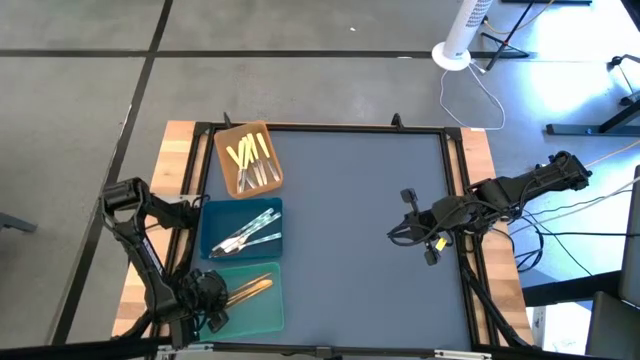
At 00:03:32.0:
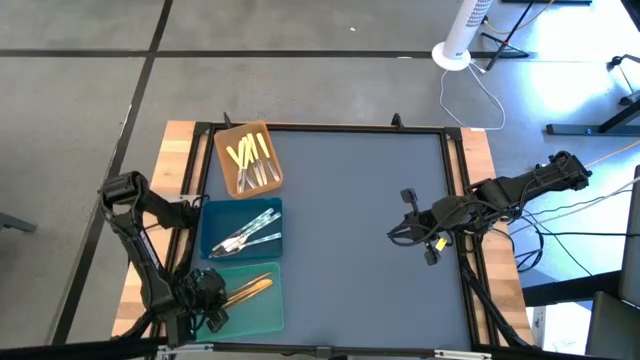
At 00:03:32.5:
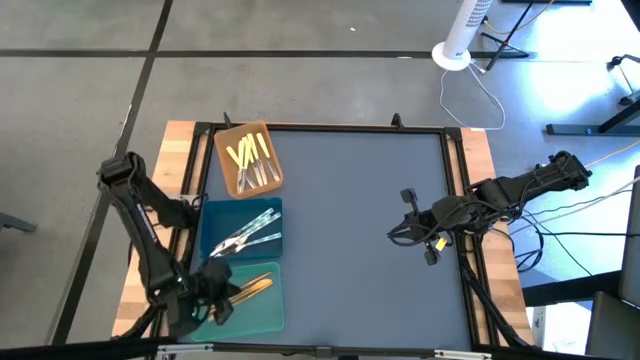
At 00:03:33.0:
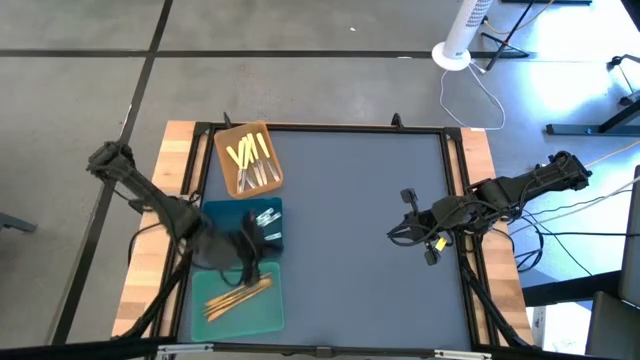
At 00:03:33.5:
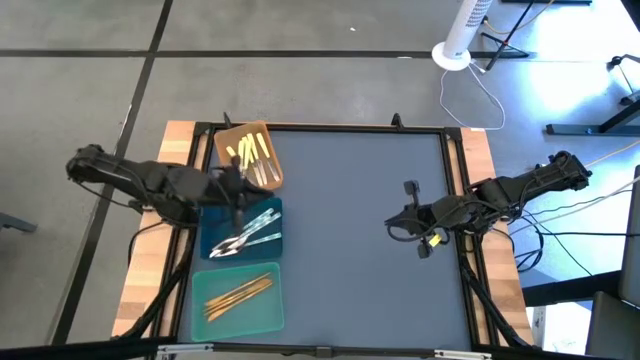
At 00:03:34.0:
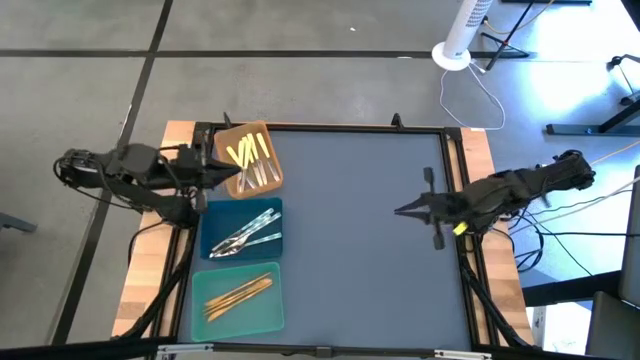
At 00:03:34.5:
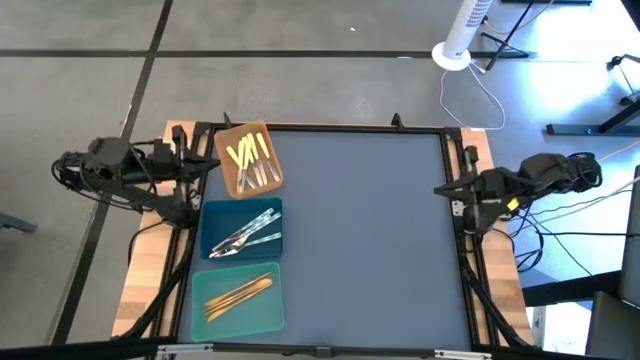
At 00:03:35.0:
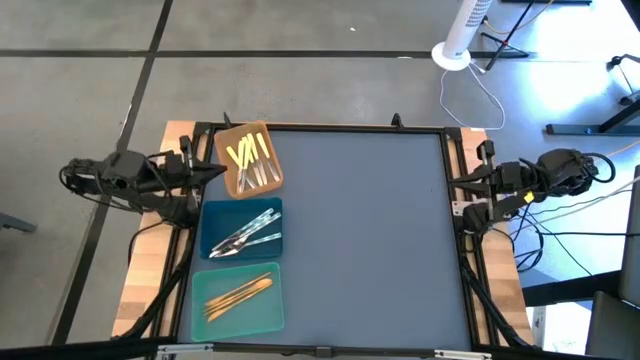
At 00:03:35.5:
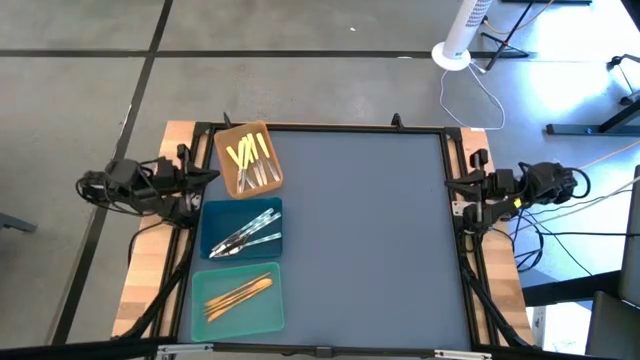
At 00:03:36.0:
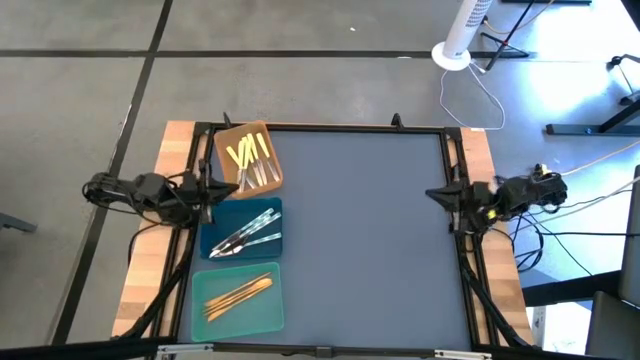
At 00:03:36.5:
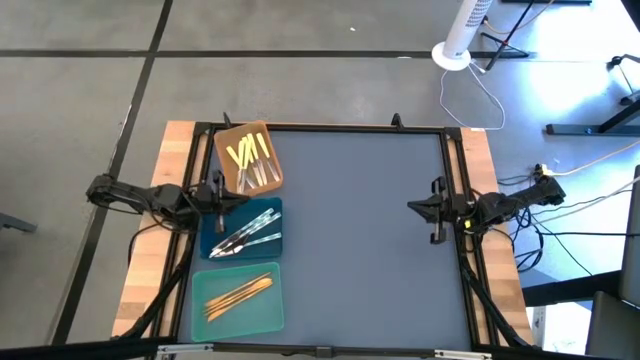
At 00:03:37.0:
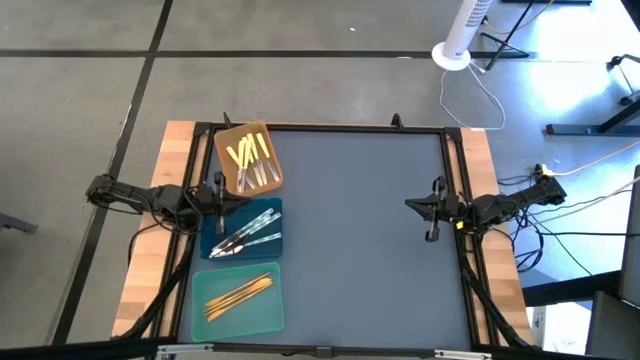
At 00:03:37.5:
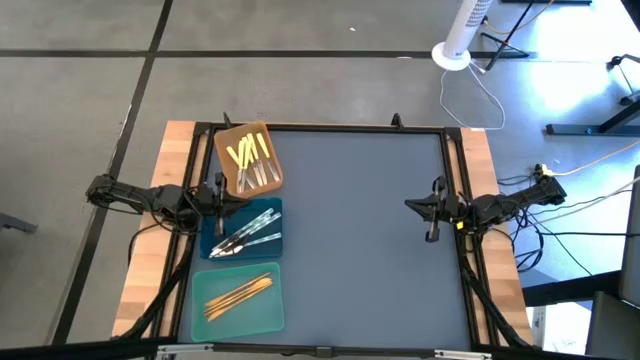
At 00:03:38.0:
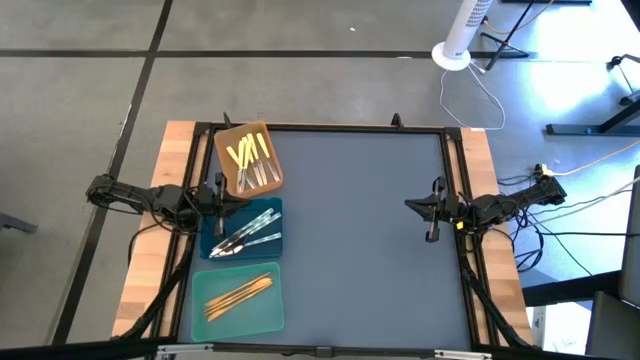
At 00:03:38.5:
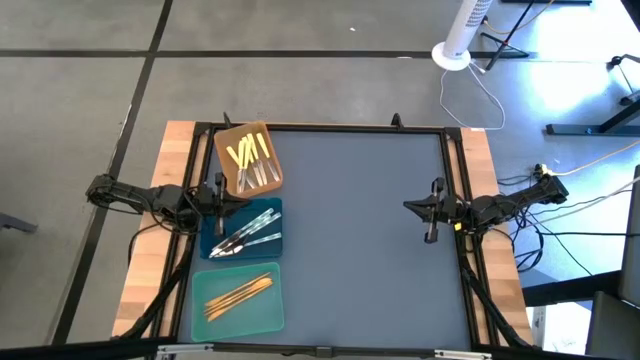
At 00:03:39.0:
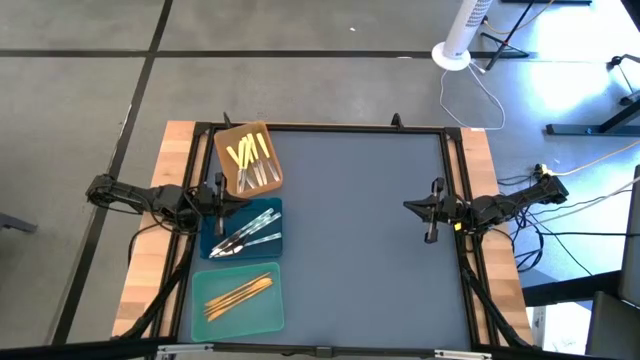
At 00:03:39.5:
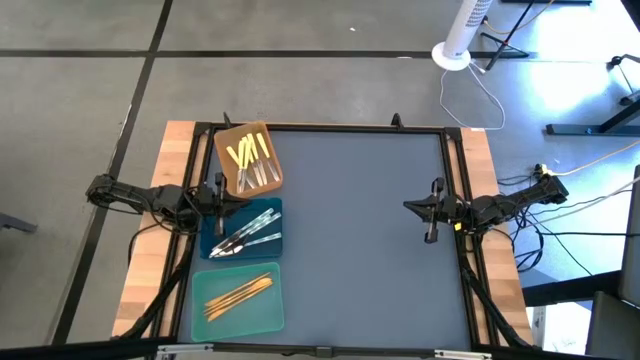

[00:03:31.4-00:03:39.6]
Task: Sort silverware by color (type)
Return to Home Position

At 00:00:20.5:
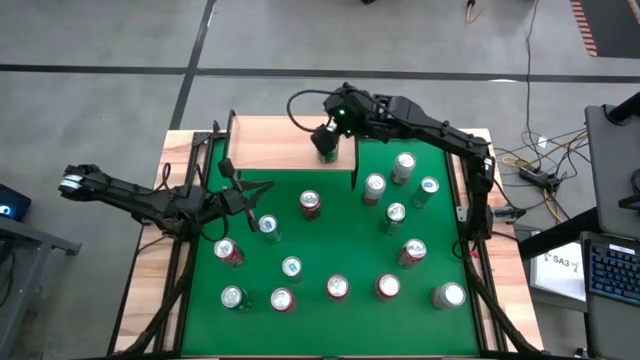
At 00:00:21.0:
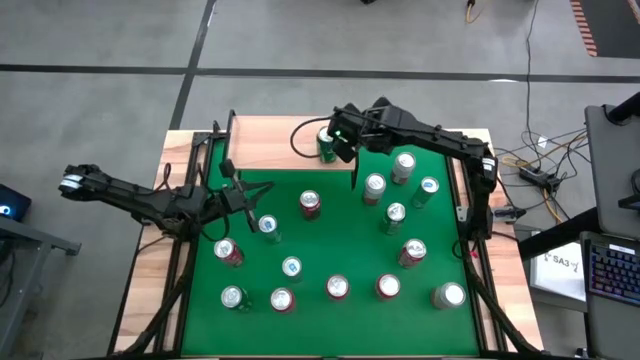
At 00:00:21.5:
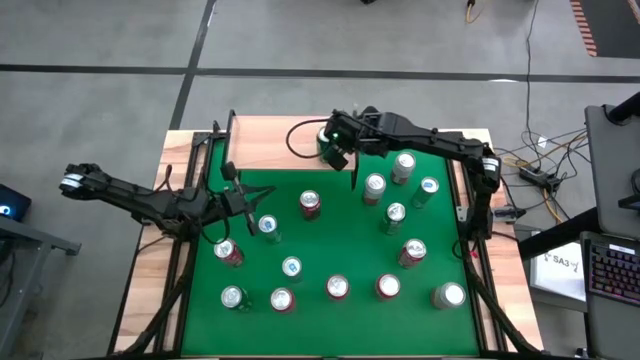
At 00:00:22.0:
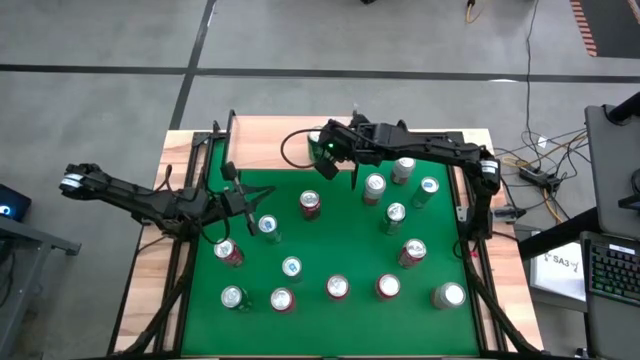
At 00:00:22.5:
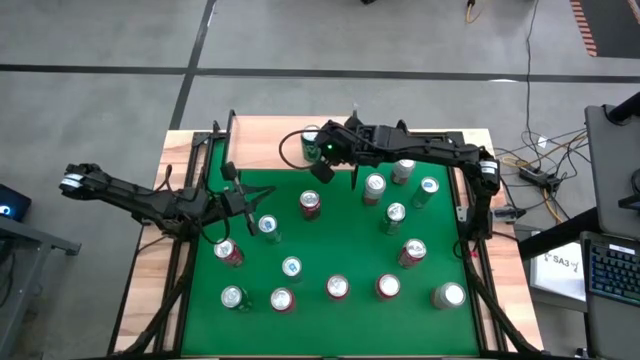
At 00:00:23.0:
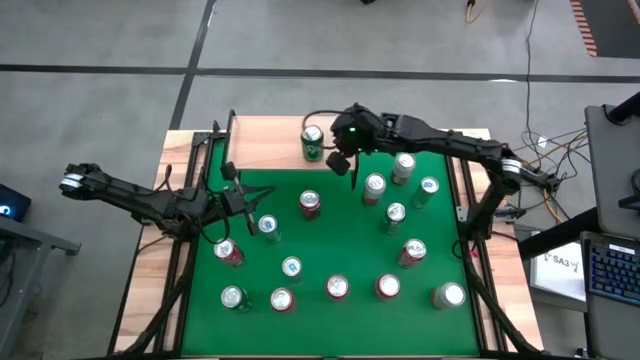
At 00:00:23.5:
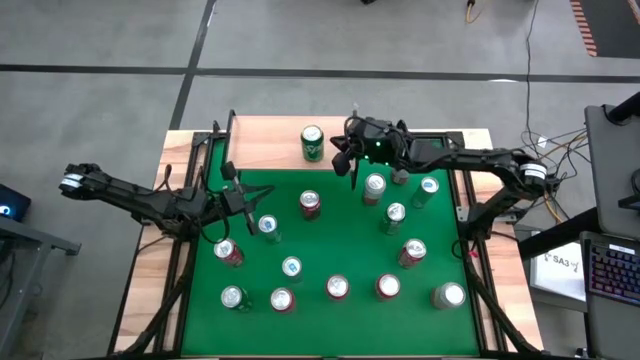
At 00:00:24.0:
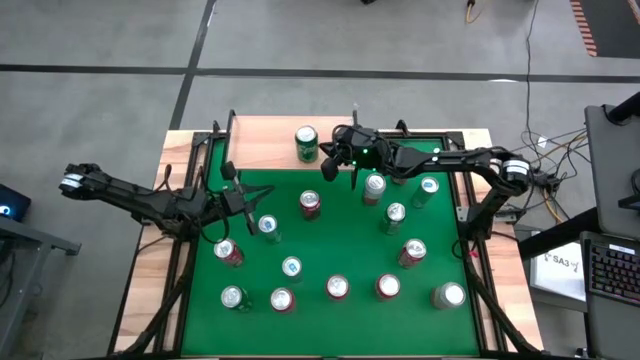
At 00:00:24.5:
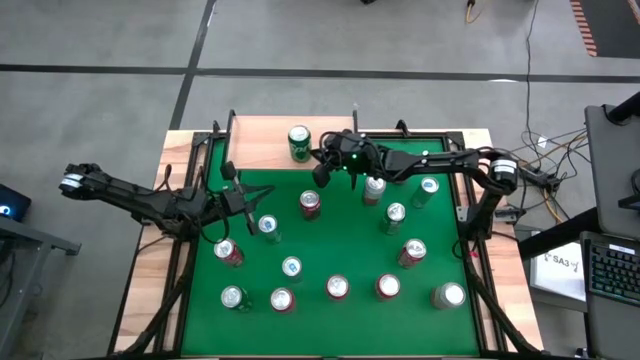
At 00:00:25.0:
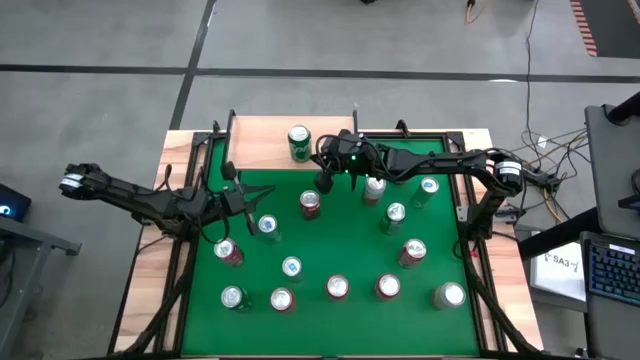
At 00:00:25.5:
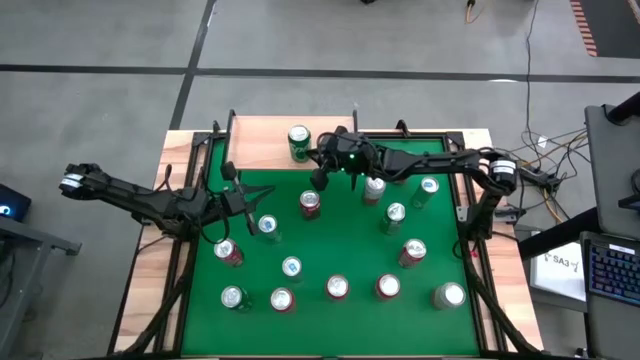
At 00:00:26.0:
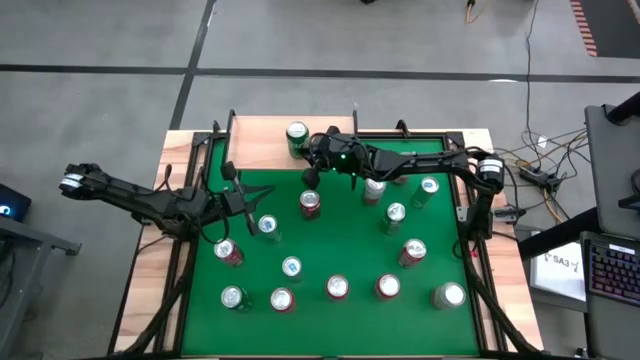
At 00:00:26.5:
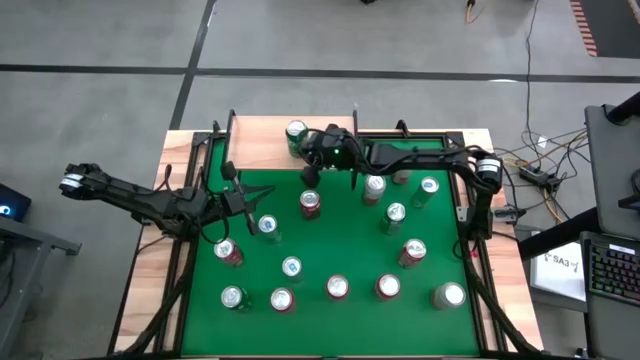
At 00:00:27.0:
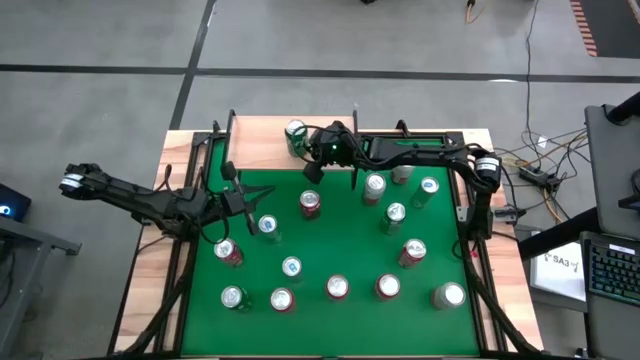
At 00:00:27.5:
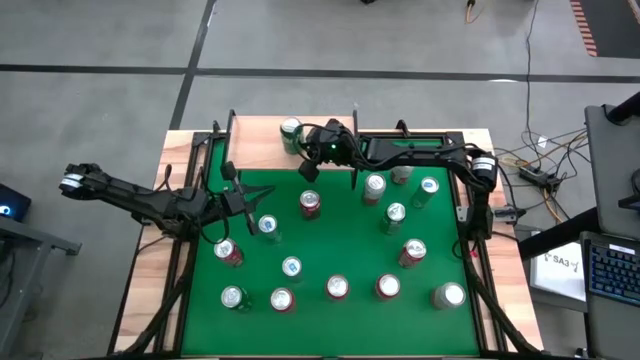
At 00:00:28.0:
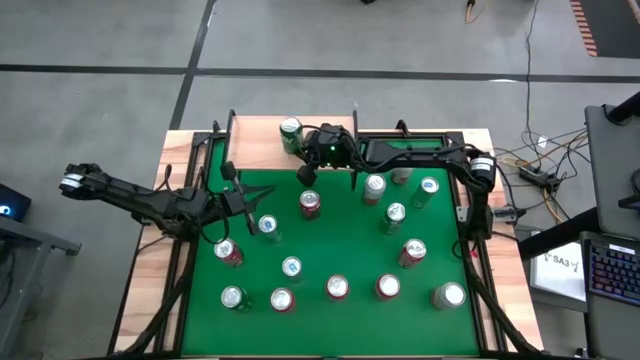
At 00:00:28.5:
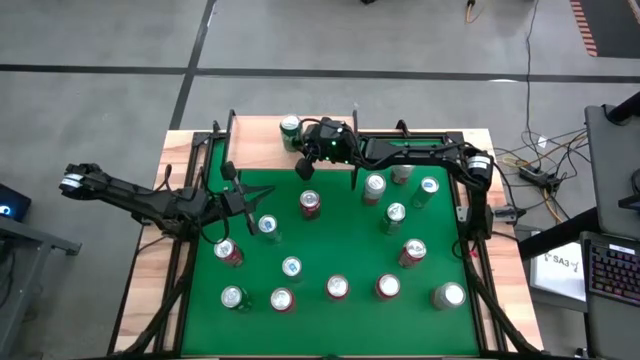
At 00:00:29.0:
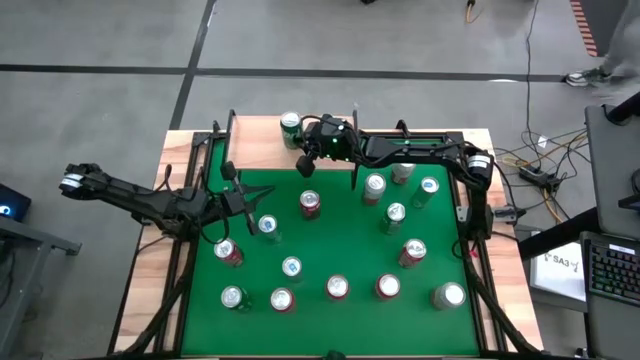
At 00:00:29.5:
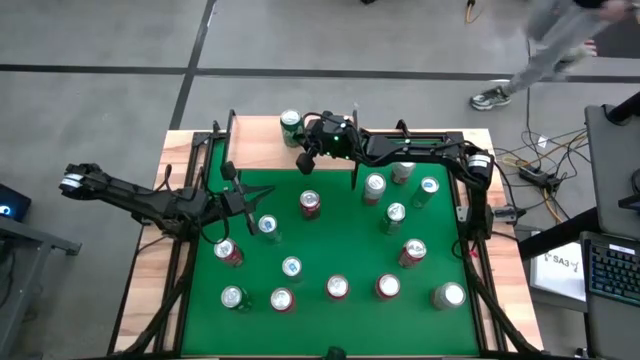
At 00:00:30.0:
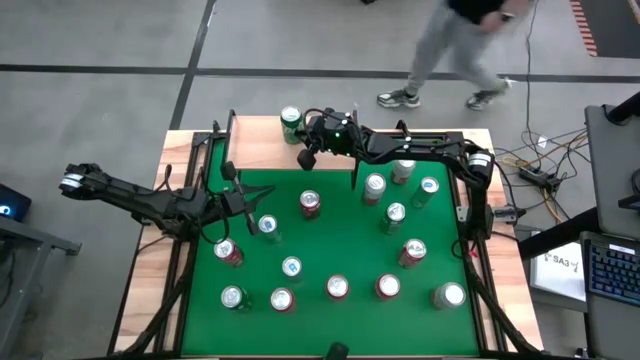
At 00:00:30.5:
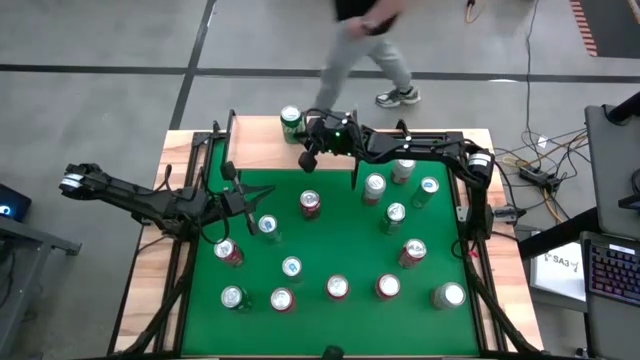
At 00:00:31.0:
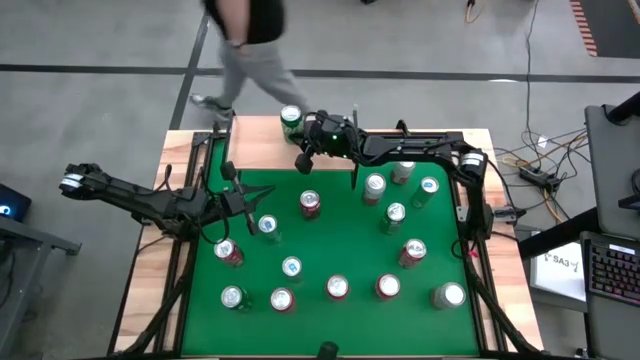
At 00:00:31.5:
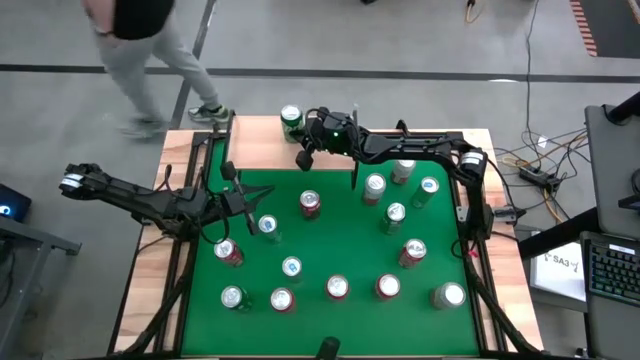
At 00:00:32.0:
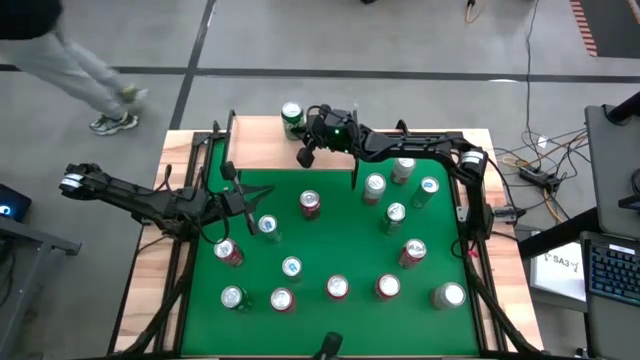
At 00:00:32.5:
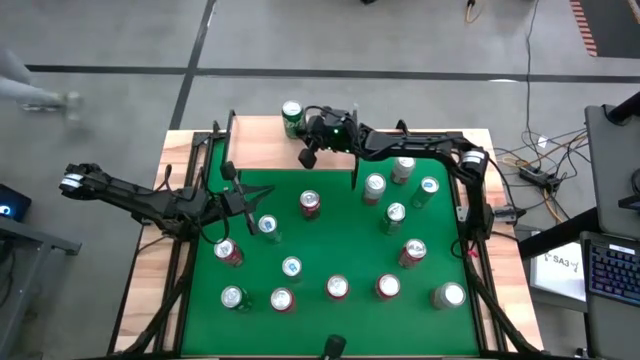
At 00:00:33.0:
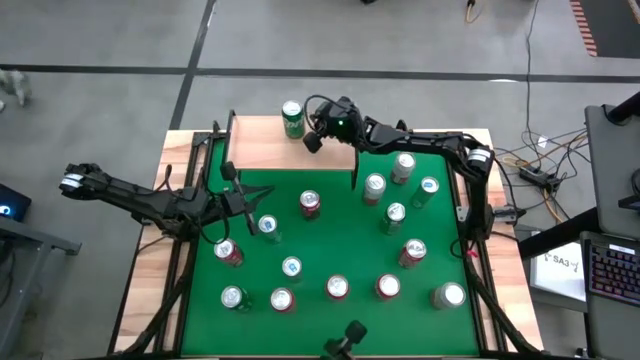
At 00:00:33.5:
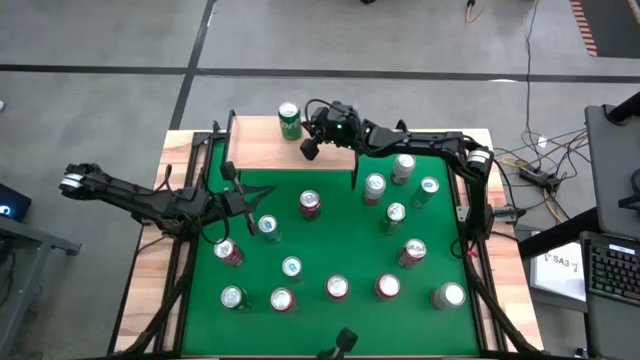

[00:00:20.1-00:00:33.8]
Task: Place canned beverage on shelf
Put the blue can on the shelf
